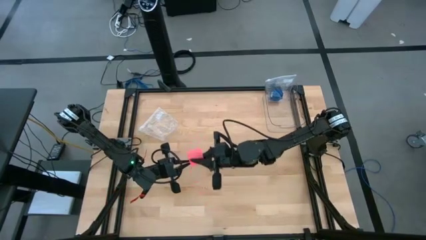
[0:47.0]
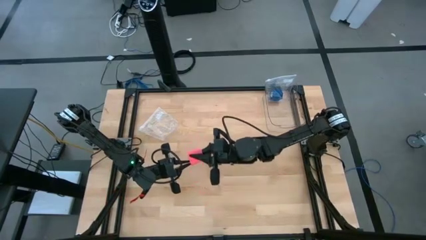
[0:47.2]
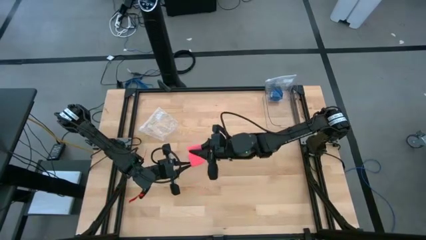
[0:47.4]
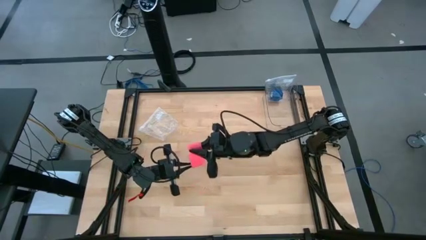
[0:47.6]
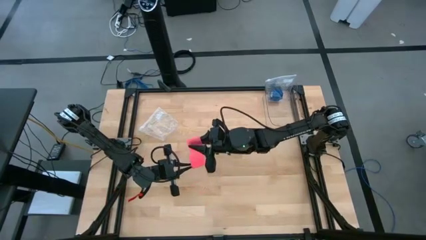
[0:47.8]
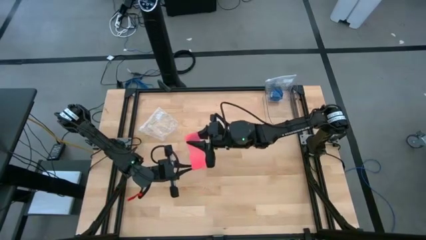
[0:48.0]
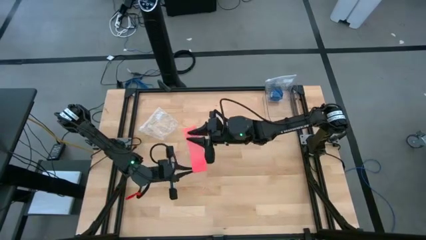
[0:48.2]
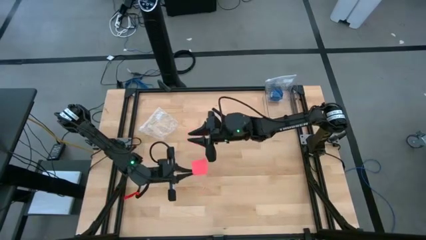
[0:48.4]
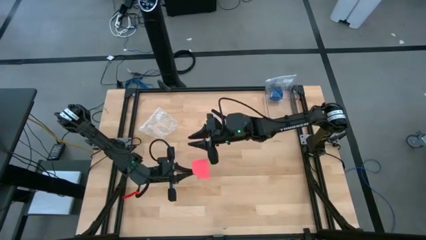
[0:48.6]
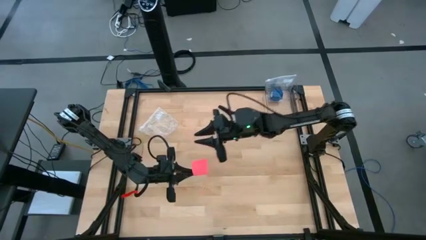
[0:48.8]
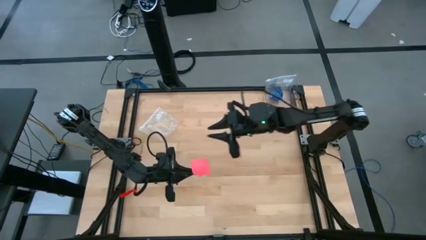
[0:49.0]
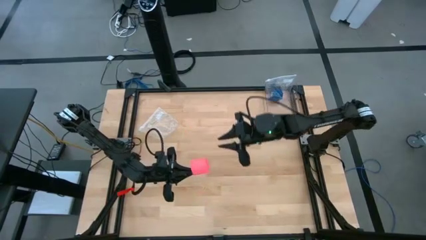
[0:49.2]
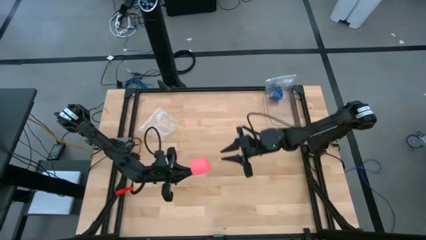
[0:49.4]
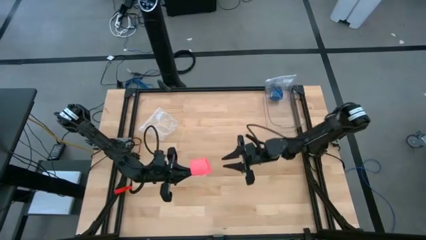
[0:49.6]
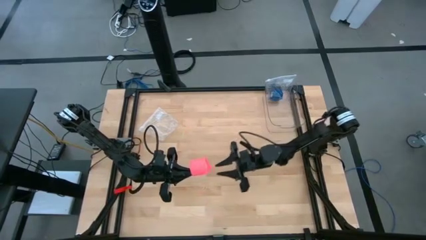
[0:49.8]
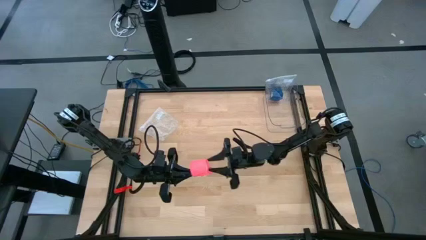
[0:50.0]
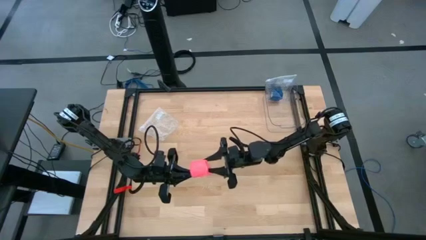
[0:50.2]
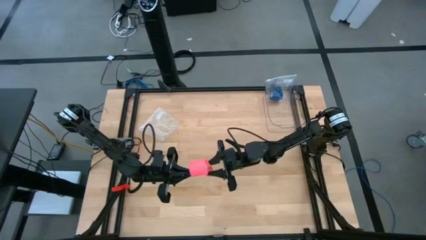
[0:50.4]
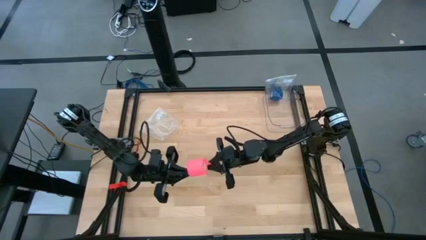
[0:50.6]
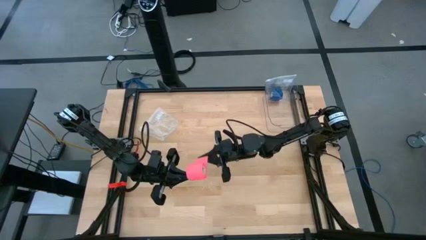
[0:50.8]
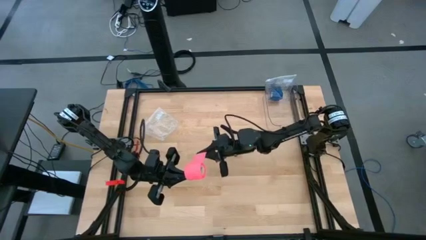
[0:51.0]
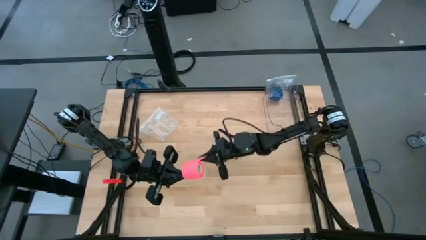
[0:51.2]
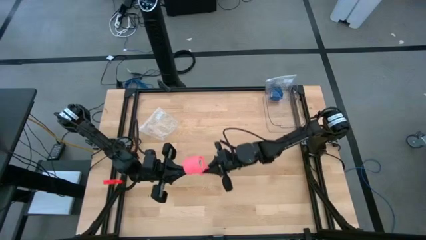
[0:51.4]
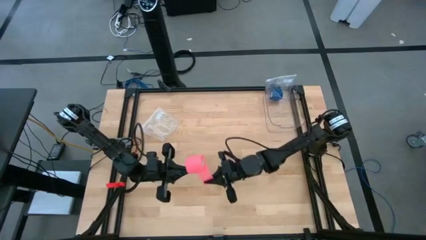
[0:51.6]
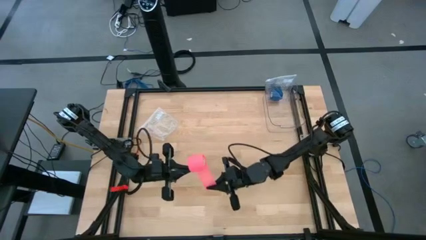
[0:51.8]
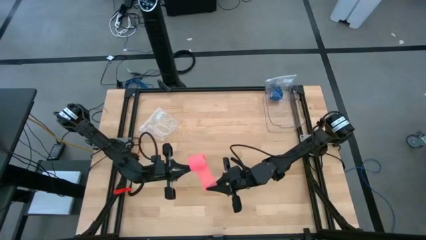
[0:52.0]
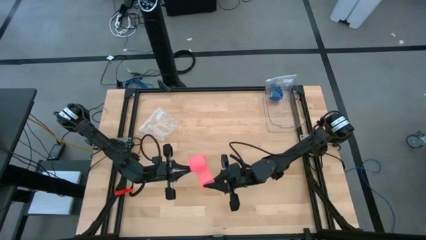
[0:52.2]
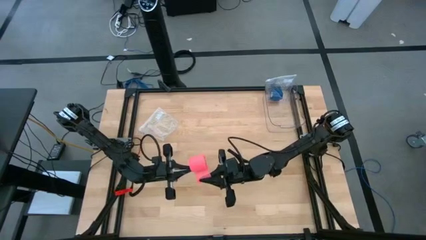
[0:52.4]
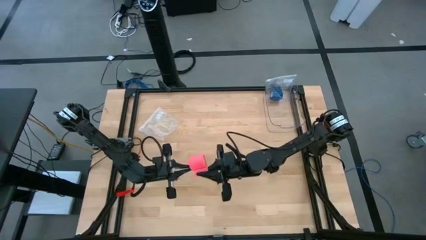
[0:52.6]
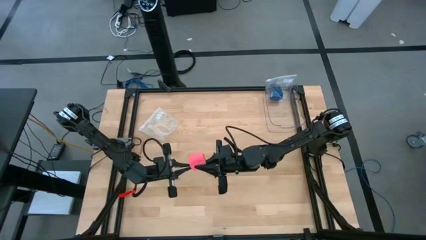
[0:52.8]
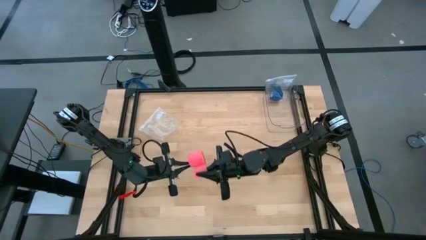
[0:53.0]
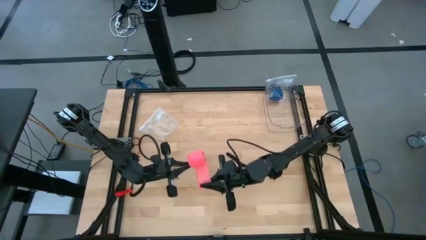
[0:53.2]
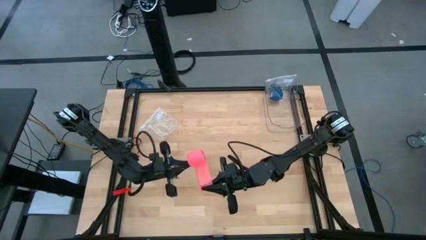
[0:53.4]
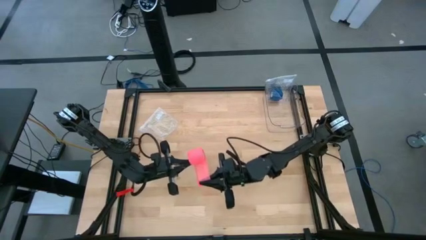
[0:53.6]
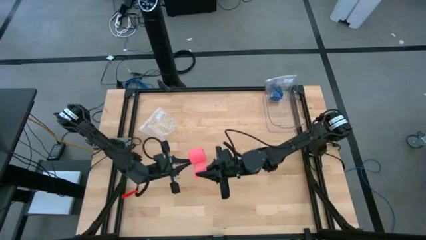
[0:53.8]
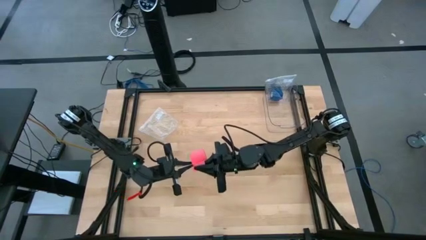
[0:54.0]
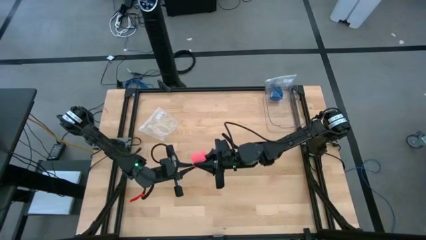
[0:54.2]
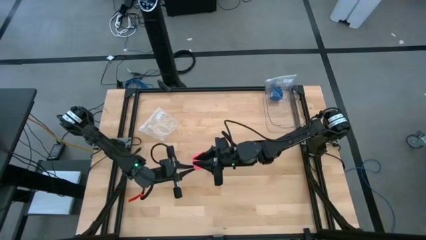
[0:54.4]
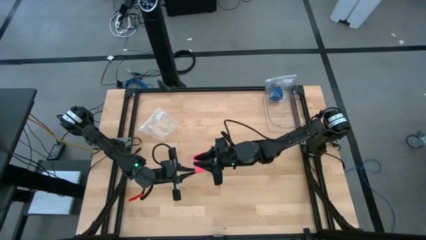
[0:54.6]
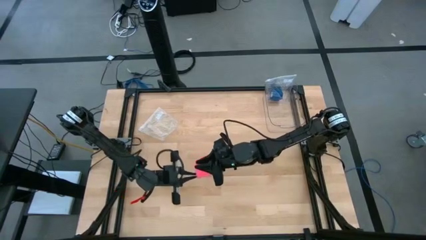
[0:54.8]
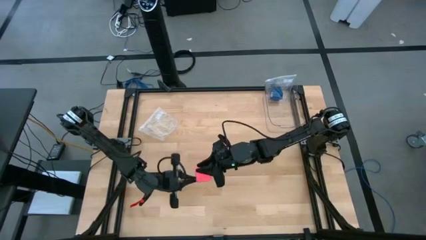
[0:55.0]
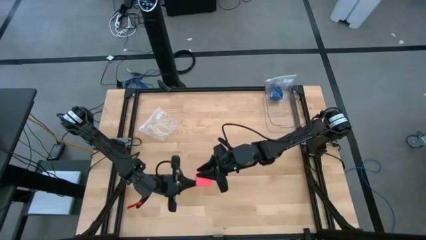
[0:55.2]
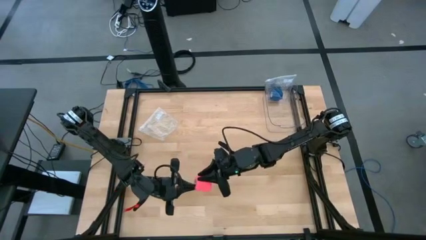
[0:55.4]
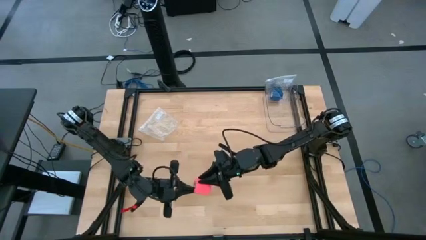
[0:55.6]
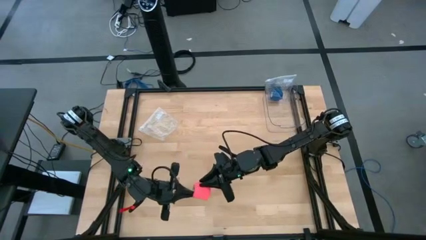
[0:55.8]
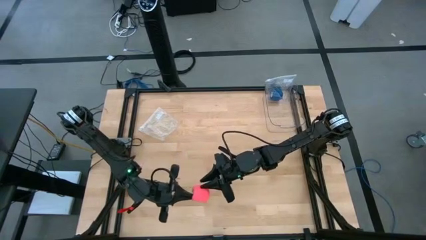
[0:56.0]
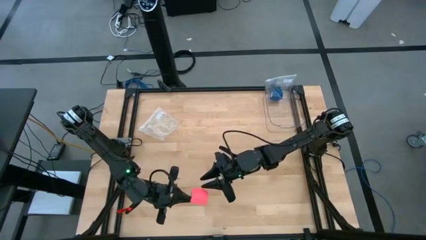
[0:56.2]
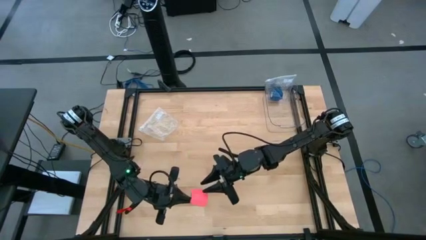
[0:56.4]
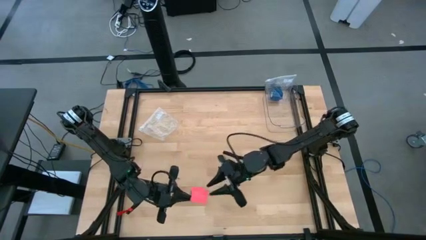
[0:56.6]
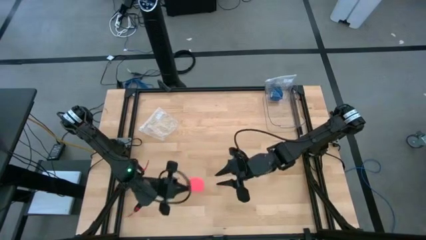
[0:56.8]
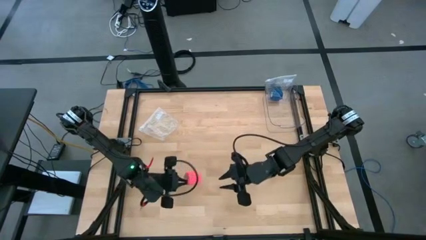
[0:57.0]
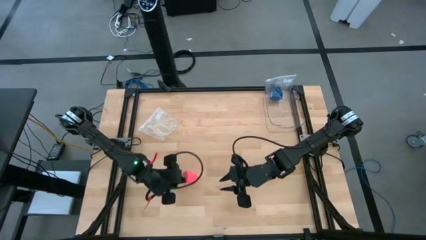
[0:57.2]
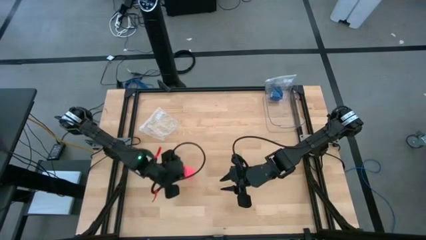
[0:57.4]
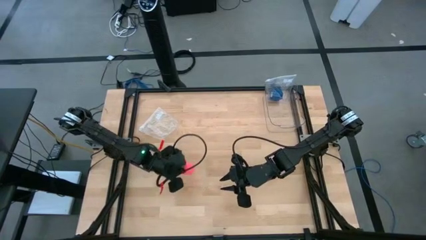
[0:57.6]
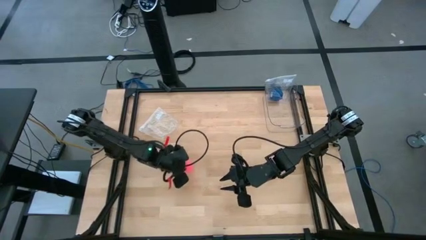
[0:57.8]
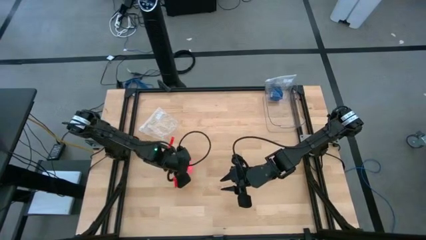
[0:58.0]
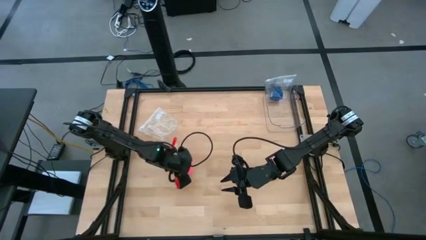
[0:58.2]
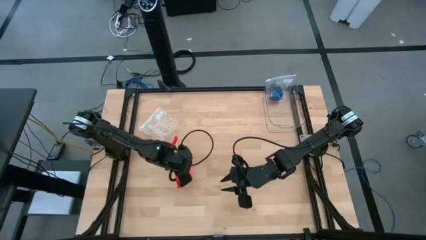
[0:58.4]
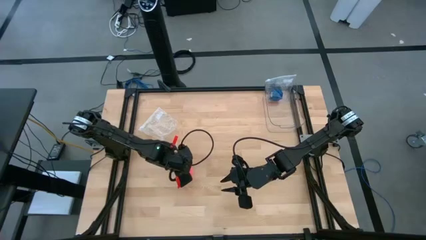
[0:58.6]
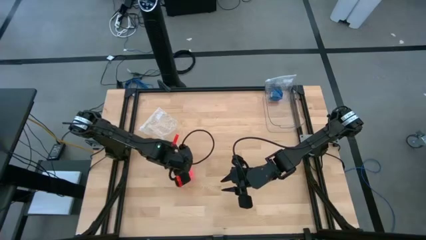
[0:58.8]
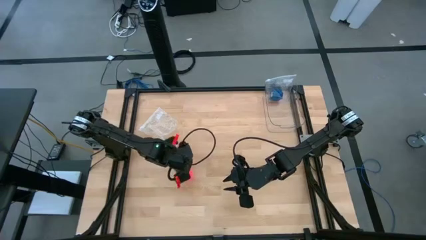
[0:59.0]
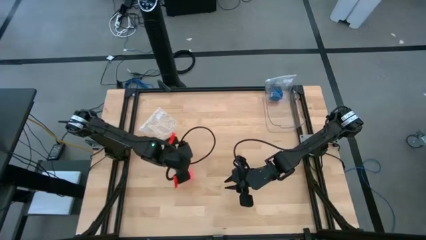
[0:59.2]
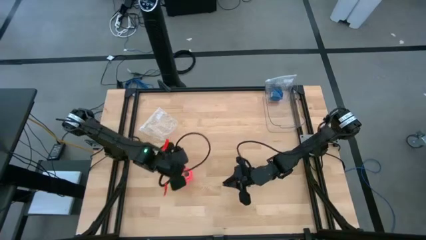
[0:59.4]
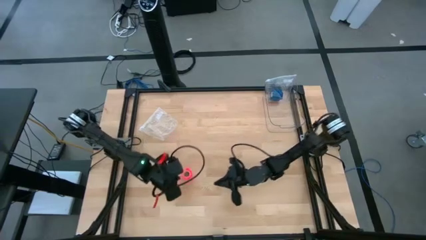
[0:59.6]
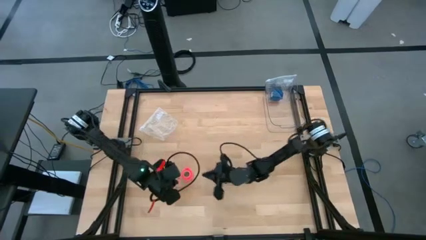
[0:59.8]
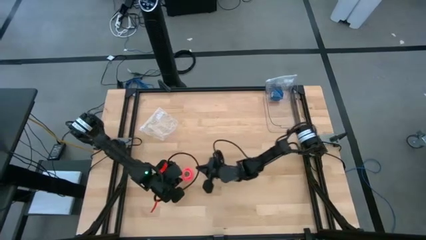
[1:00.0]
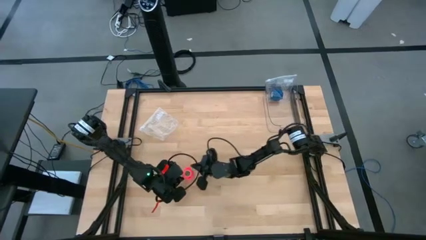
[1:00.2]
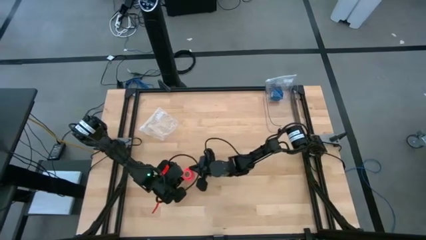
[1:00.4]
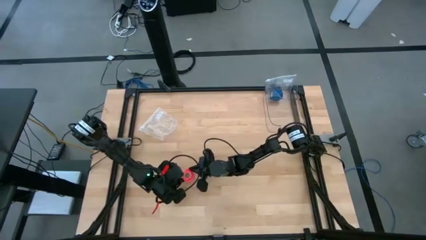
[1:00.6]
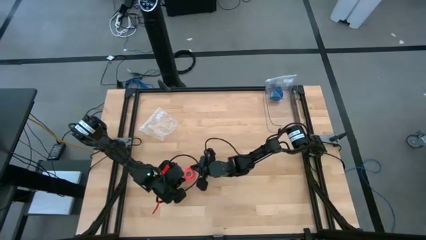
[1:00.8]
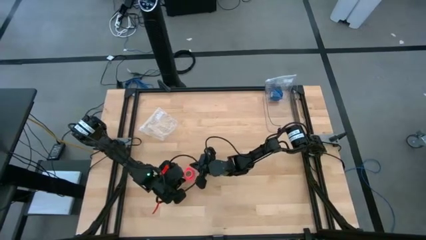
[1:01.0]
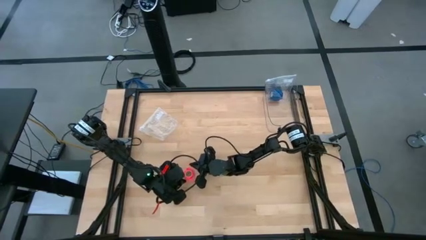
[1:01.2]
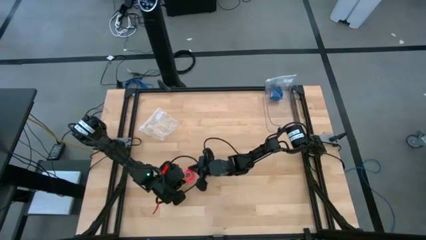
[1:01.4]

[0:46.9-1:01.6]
Task: Roll bandage
Roll the pink bandage
